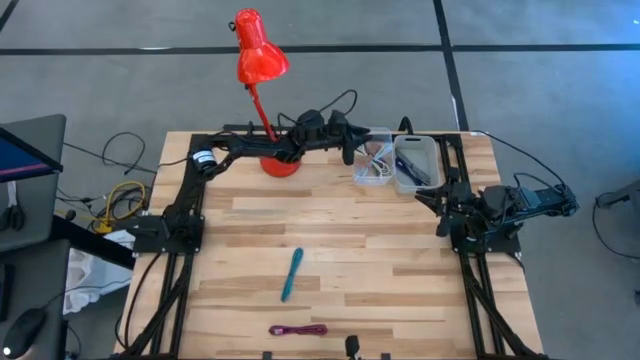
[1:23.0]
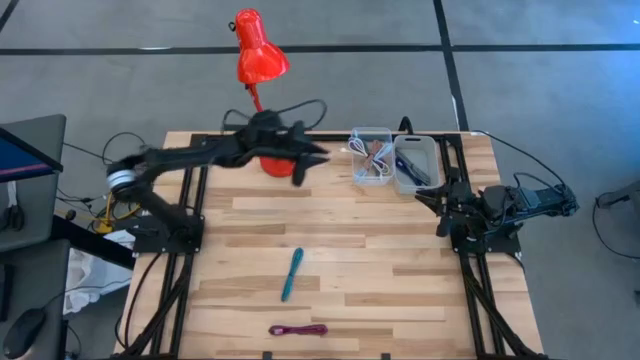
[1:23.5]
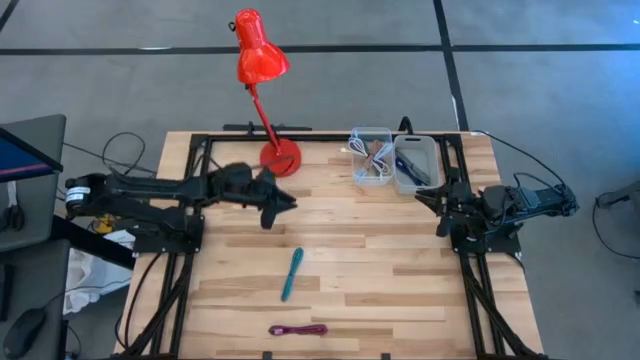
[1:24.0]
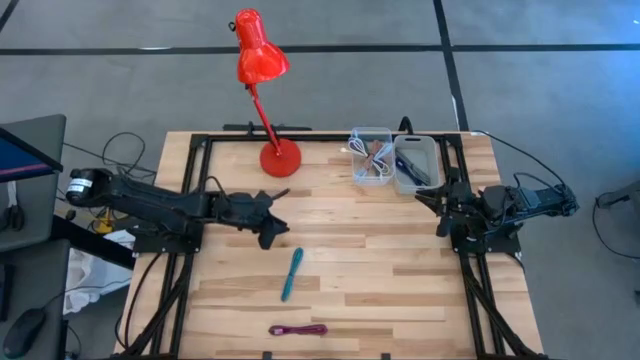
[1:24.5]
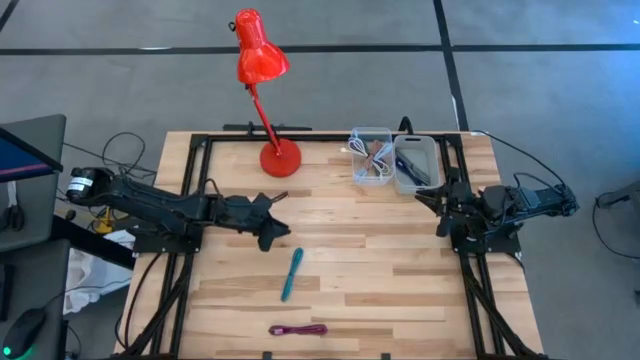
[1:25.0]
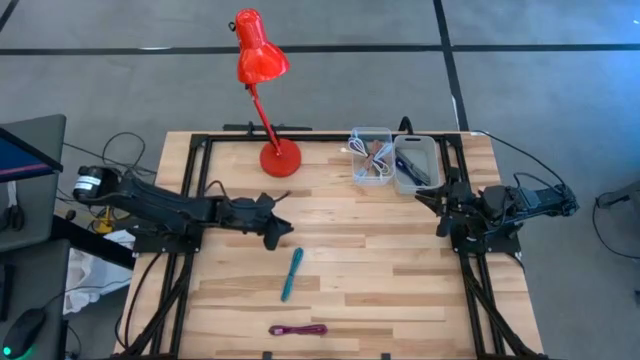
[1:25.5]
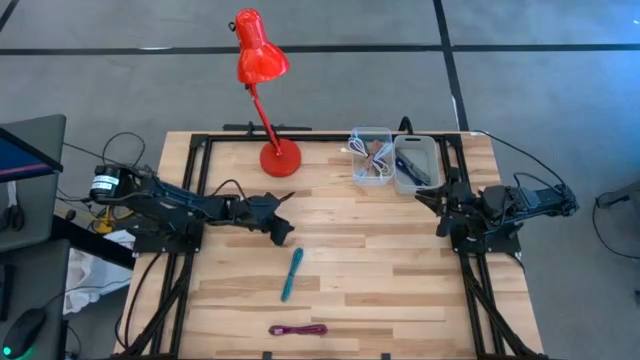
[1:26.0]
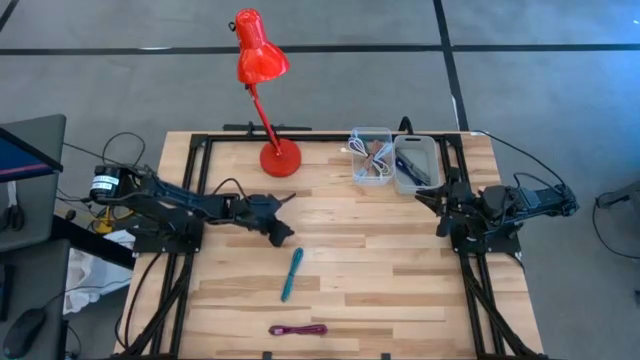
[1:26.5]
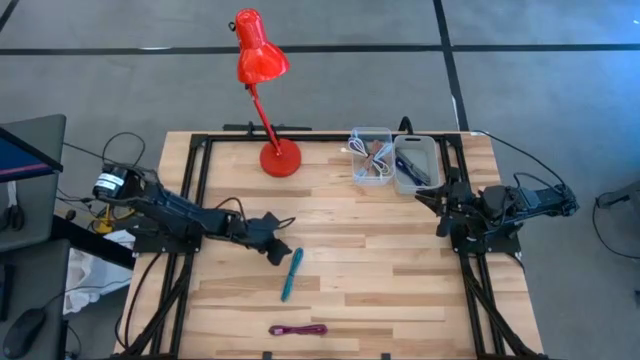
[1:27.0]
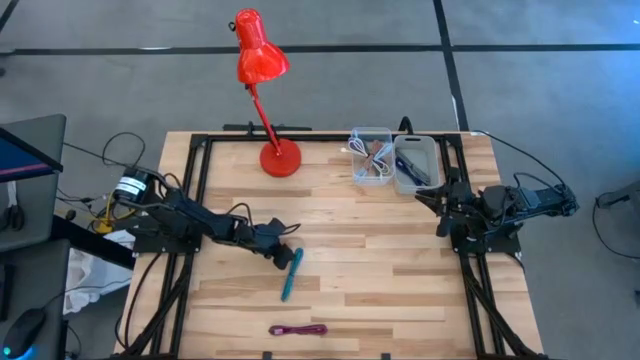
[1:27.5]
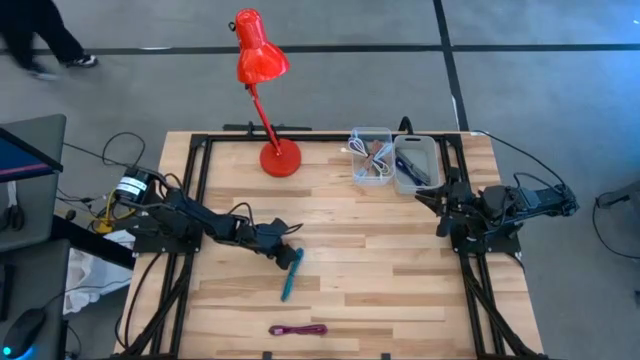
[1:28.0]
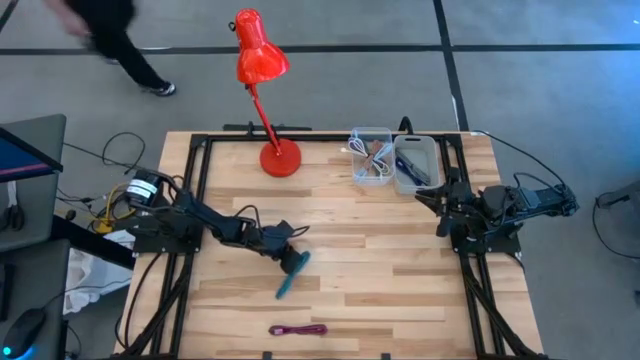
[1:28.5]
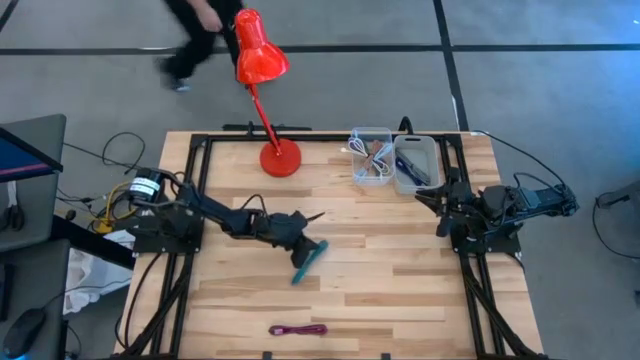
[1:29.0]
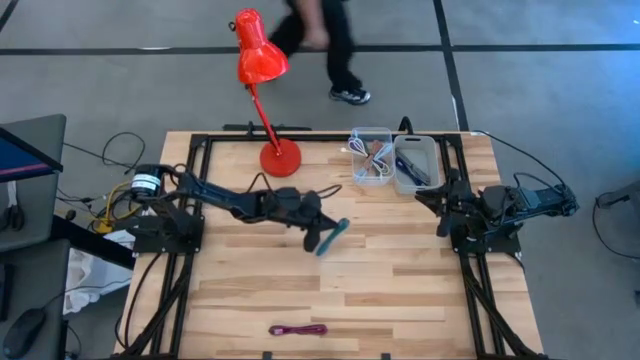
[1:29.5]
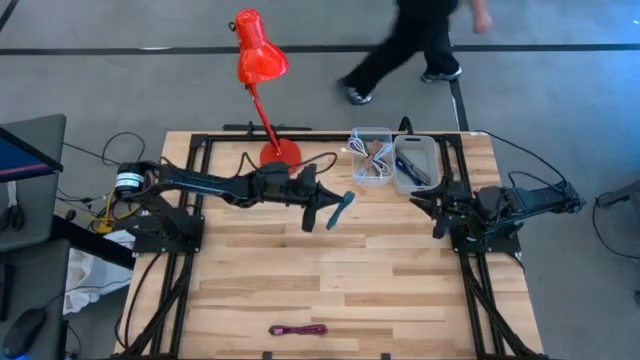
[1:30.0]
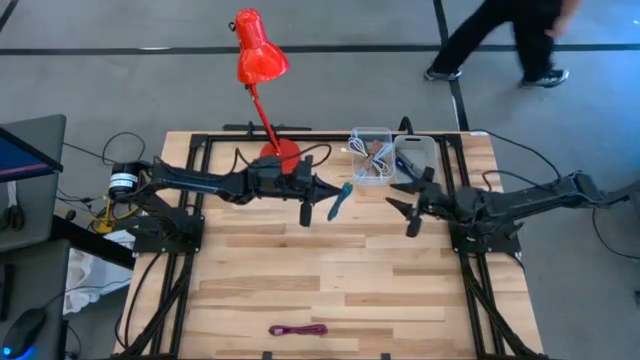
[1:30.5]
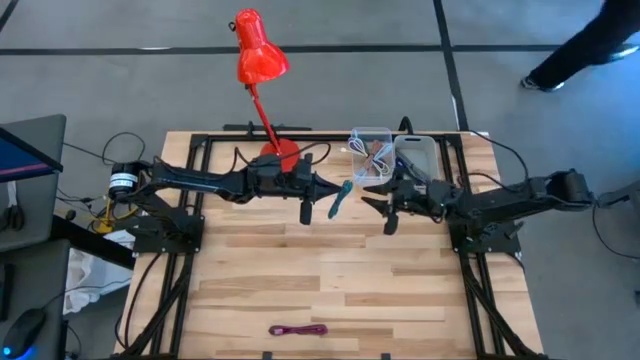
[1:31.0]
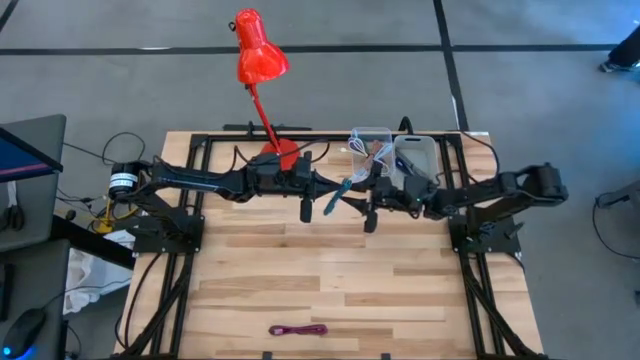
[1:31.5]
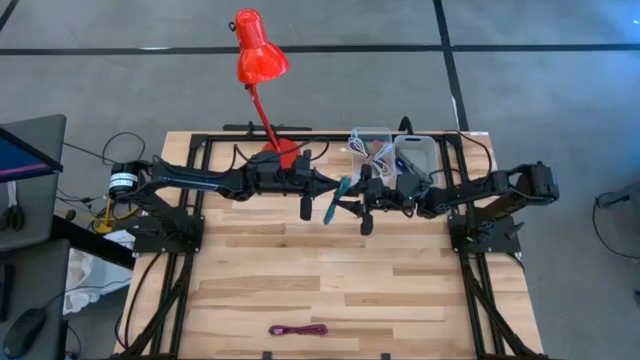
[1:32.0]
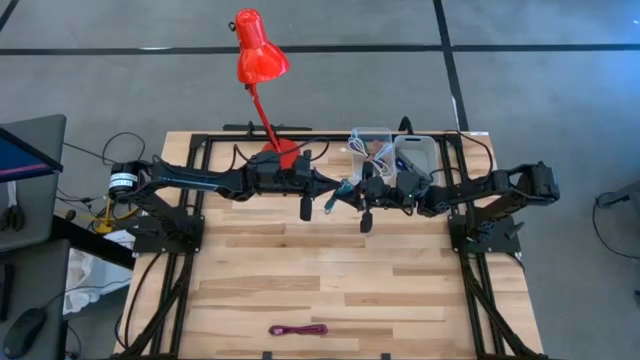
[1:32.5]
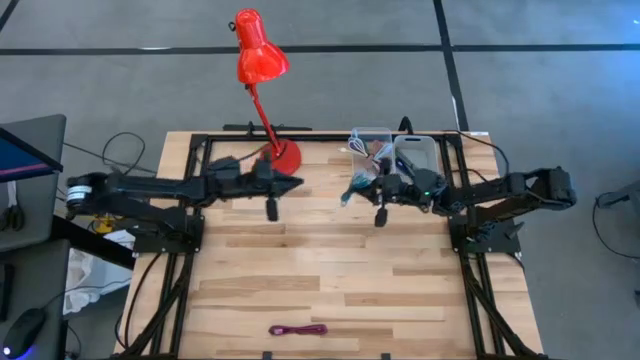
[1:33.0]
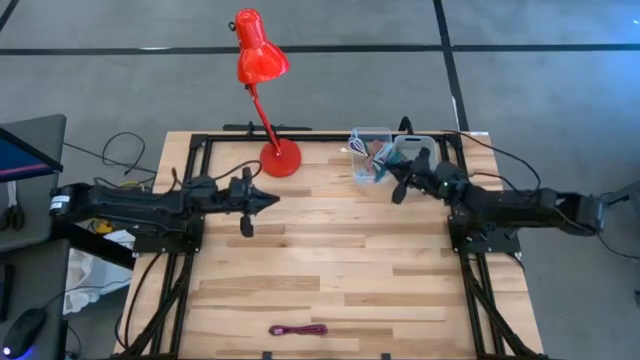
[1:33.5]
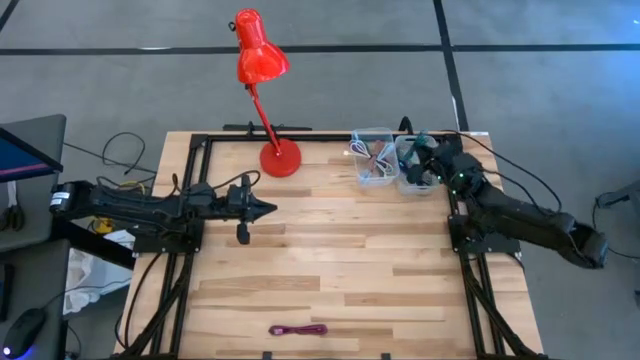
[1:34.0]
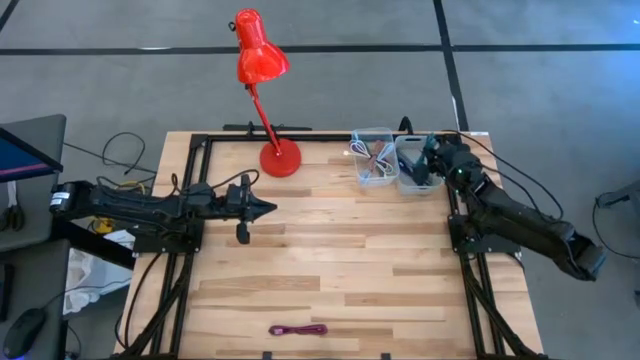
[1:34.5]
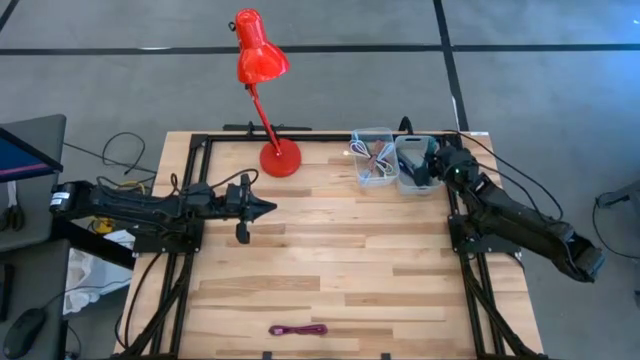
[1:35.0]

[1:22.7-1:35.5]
Task: Pick & Place USB Port
Put the black and blue charger cable into the gray bin

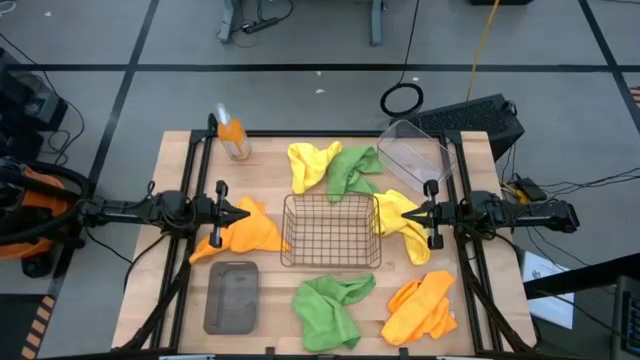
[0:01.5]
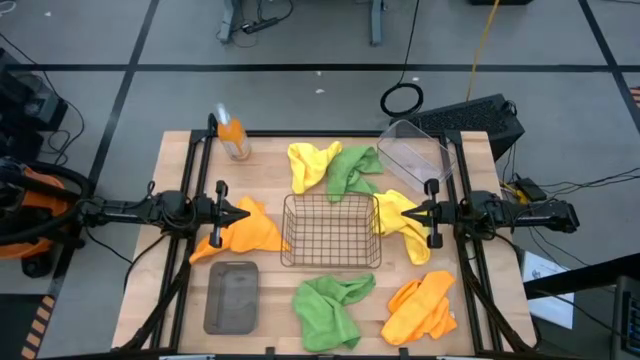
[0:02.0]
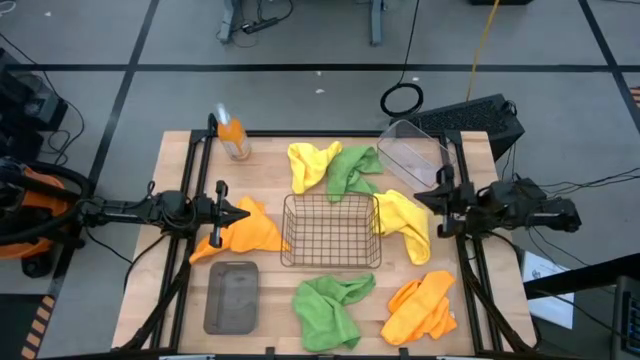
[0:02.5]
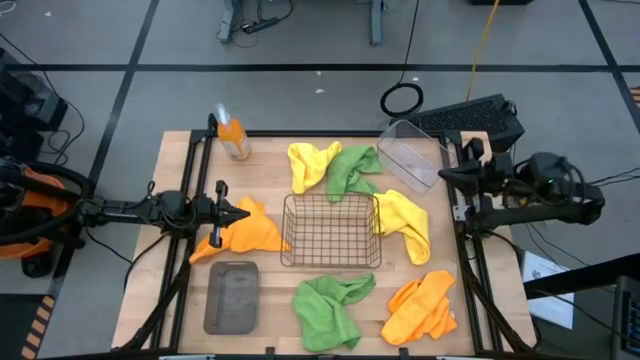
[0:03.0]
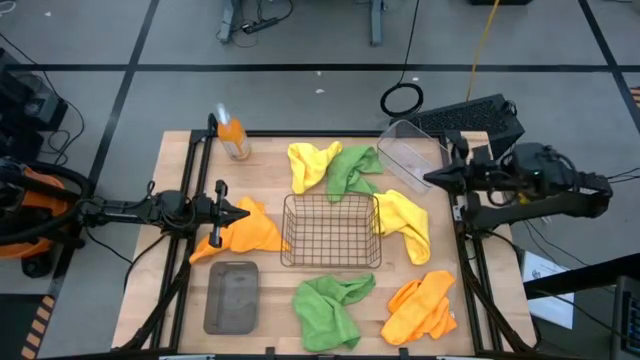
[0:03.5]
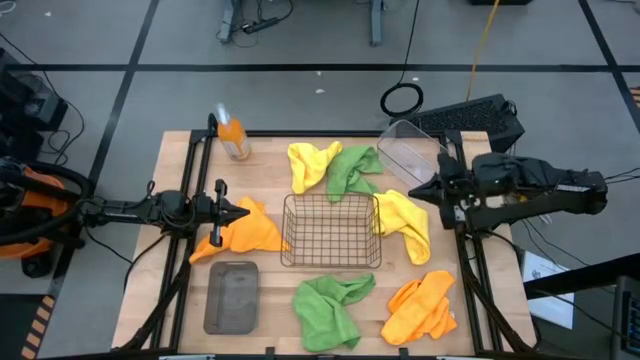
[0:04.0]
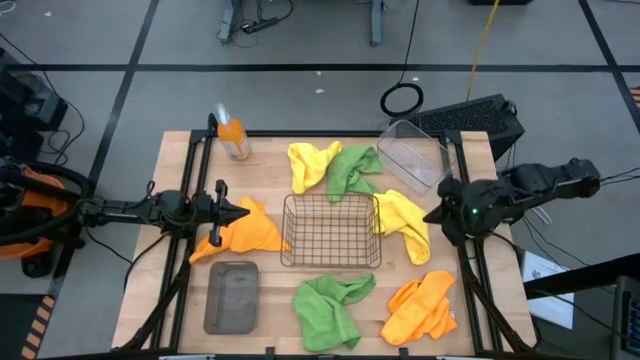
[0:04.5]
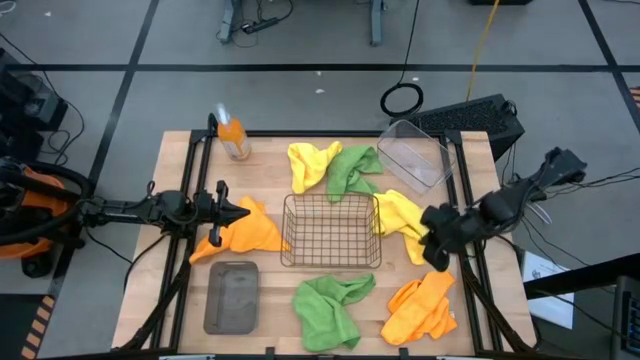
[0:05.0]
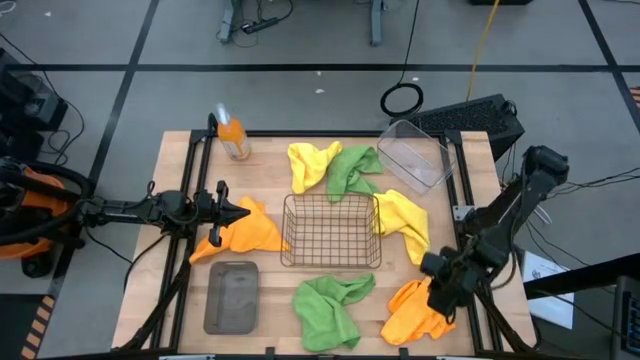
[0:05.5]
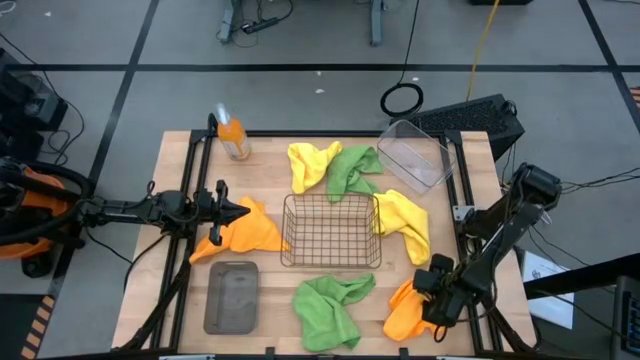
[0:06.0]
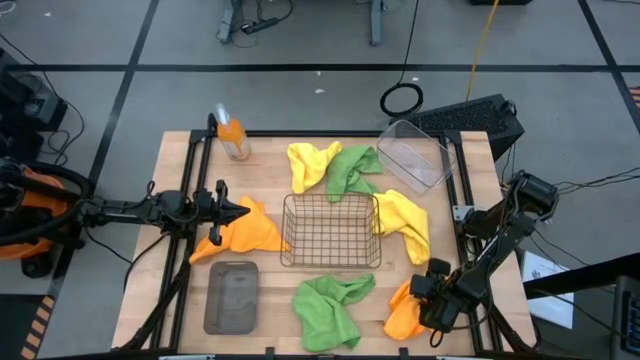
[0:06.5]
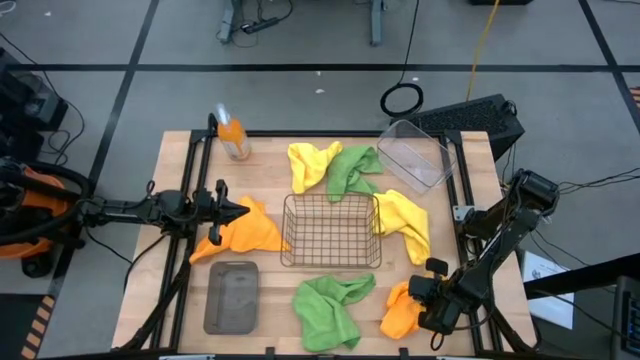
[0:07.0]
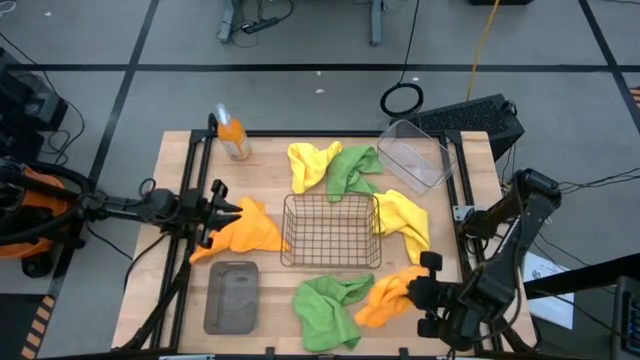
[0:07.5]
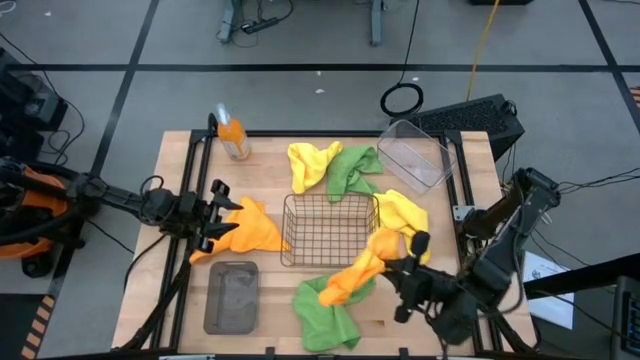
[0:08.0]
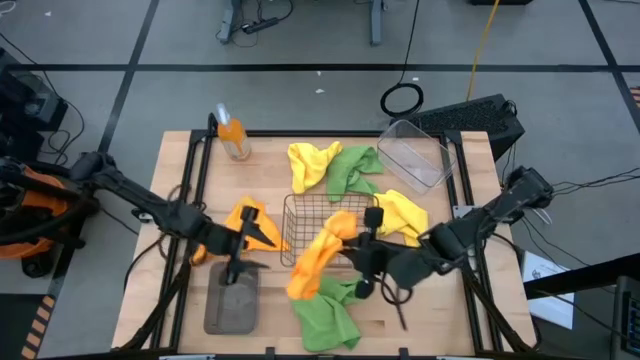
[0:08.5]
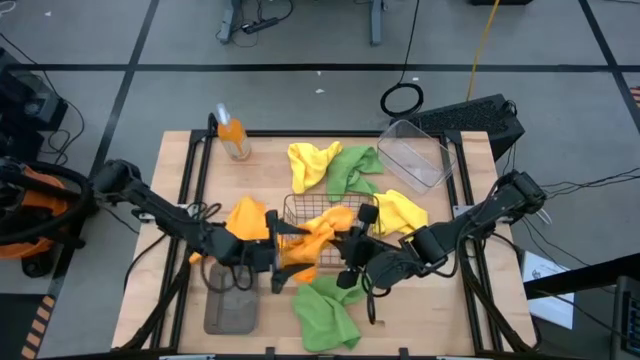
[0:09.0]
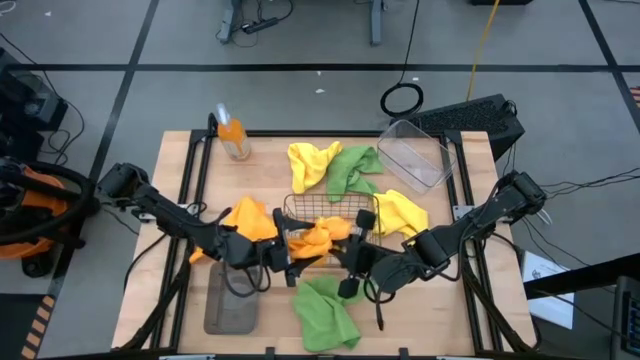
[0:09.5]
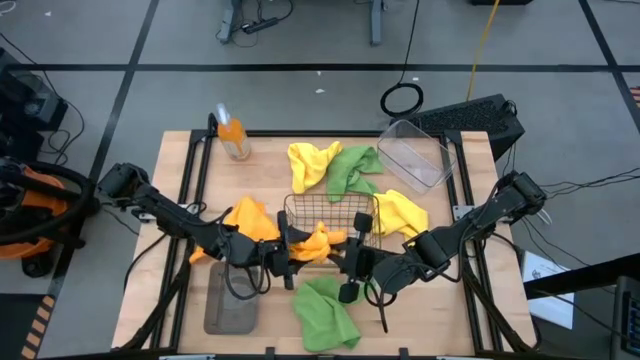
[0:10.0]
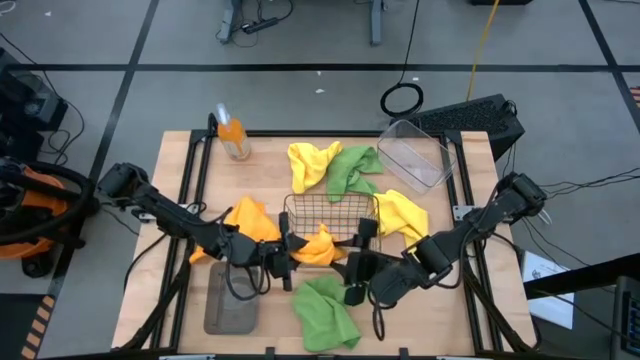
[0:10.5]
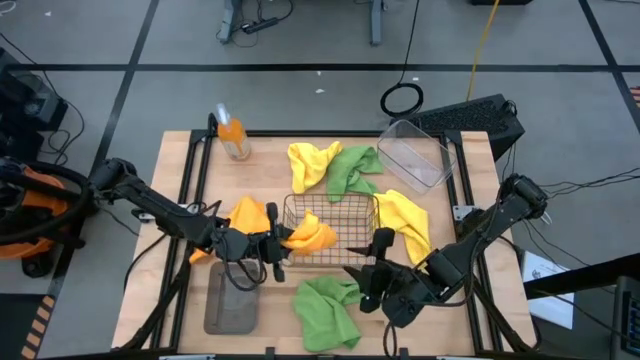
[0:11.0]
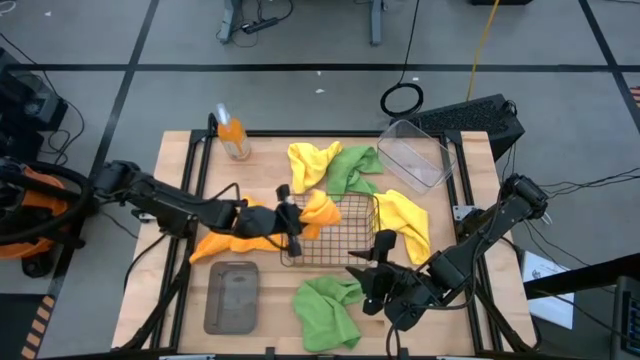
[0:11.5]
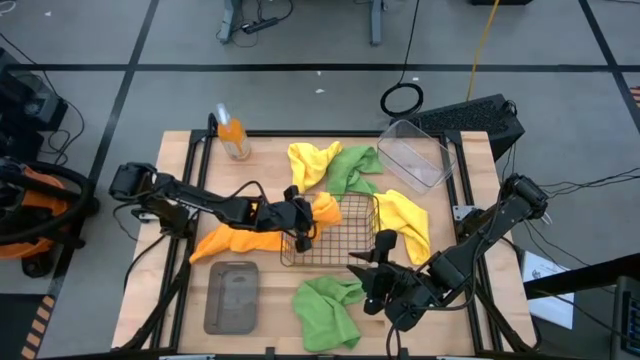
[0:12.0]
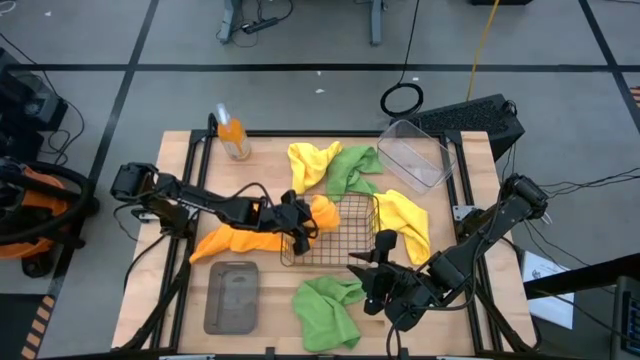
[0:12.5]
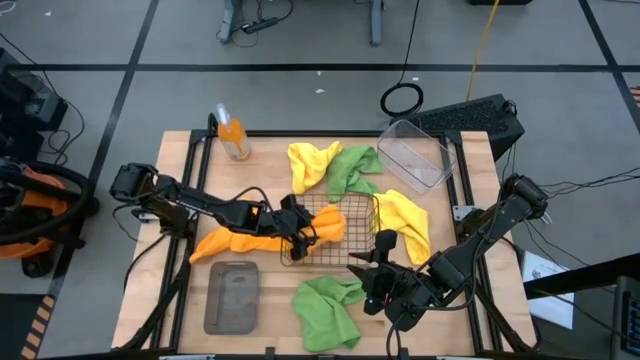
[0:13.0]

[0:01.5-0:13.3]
Task: Sort microfiber towel by color & place in baskets
Put the right orange microfiber towel into the wire bin
